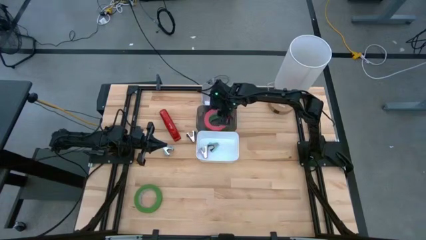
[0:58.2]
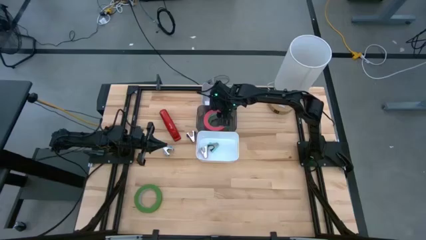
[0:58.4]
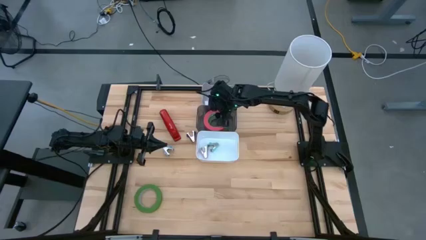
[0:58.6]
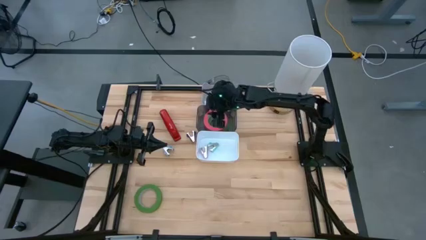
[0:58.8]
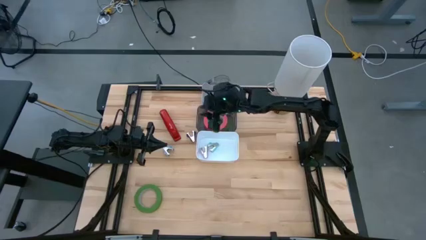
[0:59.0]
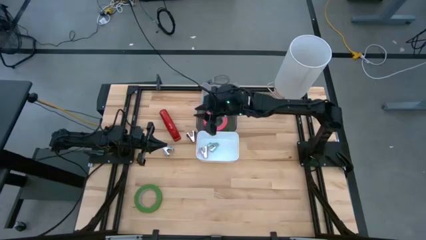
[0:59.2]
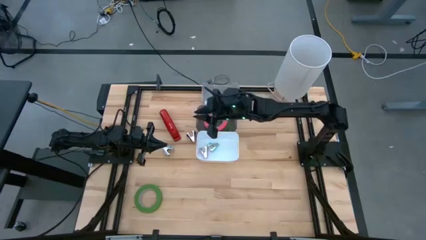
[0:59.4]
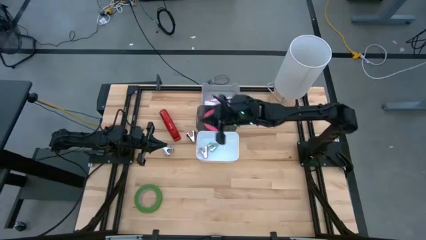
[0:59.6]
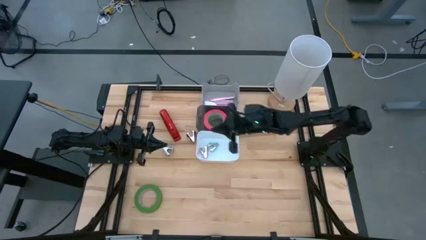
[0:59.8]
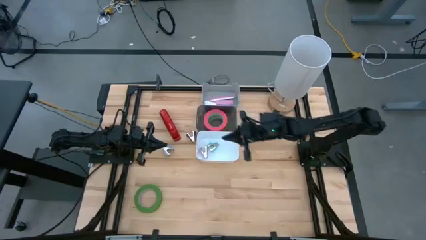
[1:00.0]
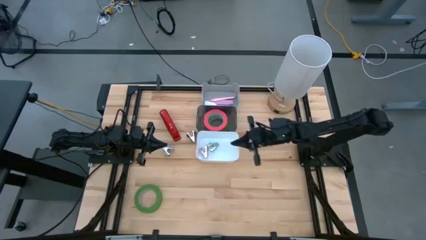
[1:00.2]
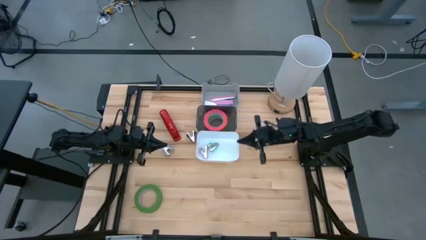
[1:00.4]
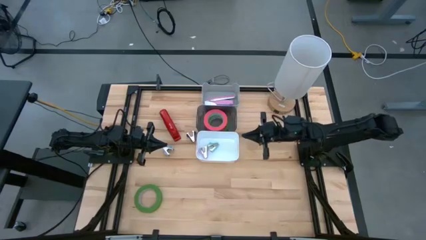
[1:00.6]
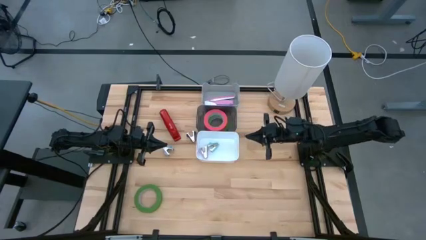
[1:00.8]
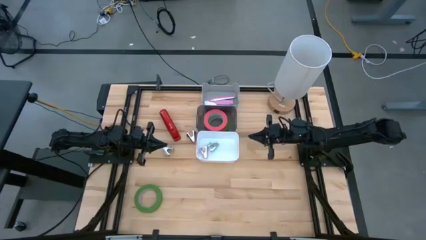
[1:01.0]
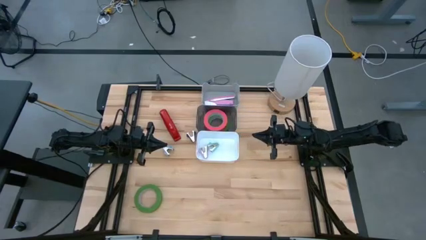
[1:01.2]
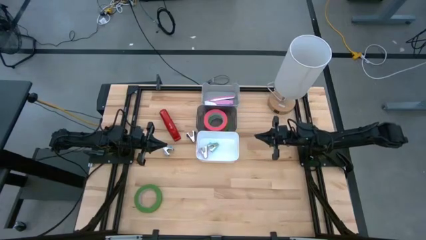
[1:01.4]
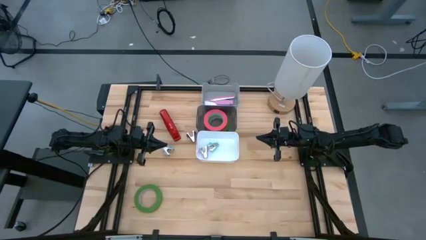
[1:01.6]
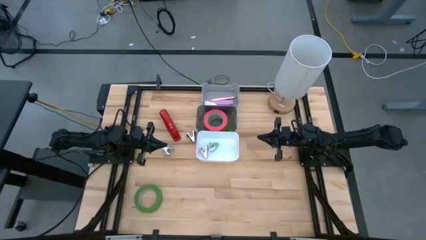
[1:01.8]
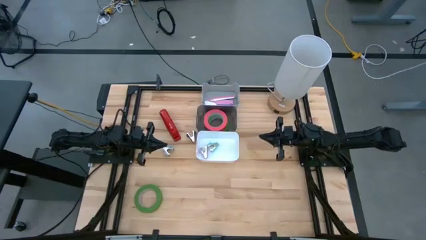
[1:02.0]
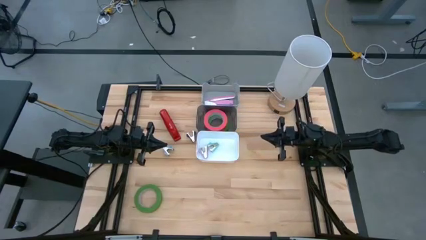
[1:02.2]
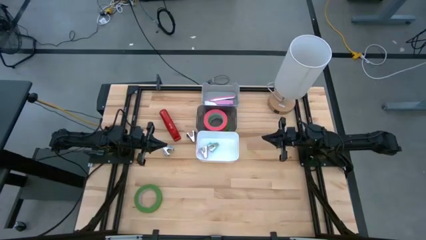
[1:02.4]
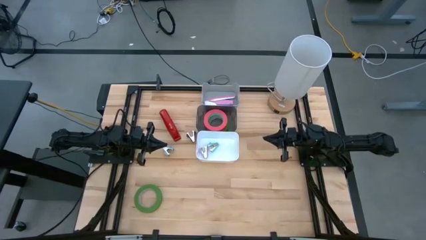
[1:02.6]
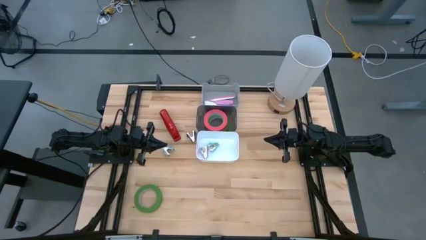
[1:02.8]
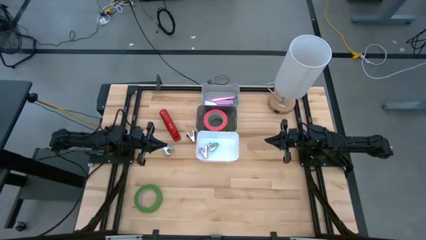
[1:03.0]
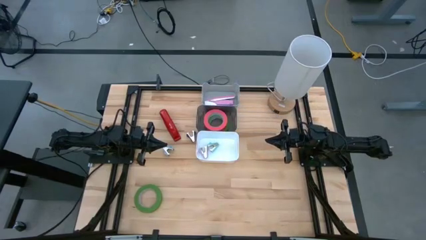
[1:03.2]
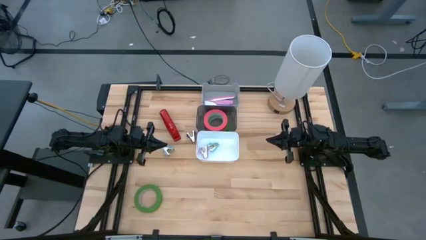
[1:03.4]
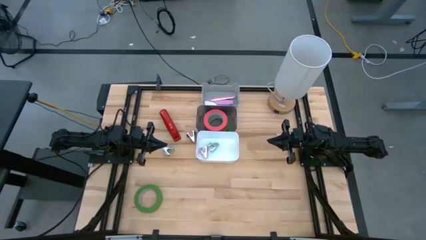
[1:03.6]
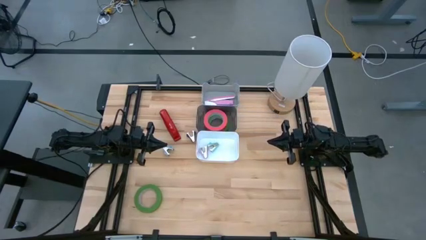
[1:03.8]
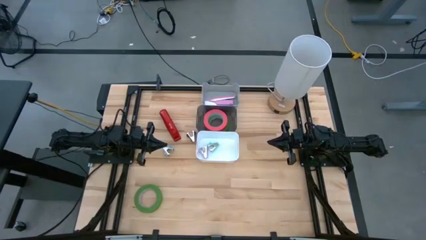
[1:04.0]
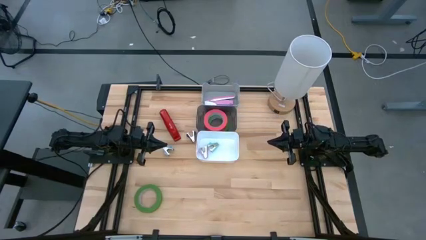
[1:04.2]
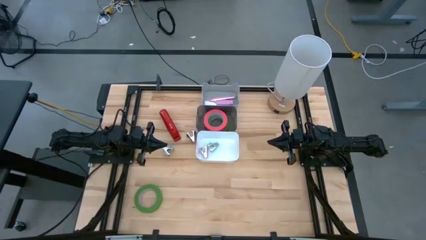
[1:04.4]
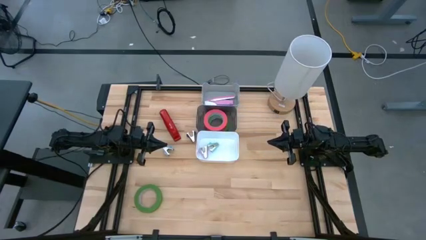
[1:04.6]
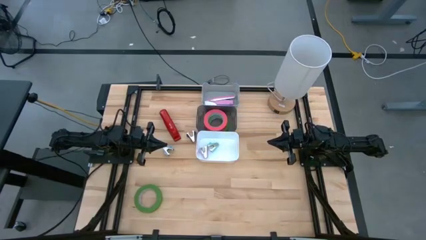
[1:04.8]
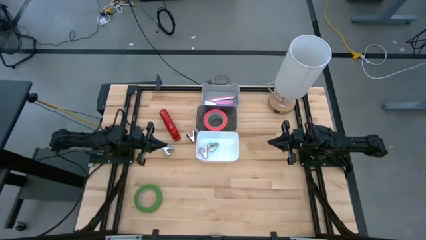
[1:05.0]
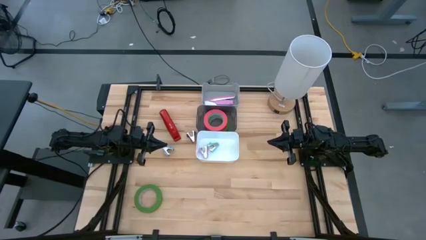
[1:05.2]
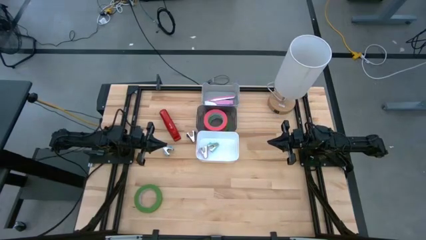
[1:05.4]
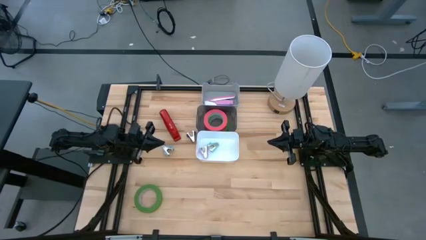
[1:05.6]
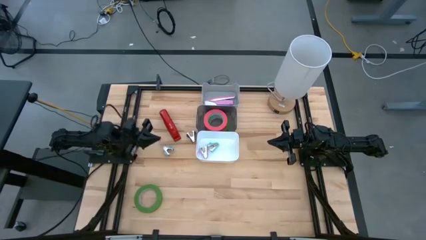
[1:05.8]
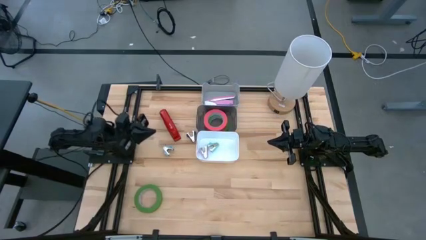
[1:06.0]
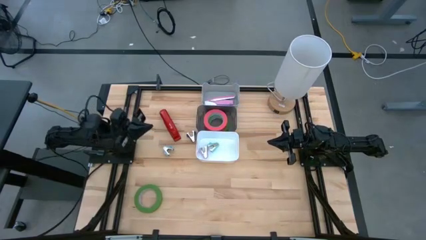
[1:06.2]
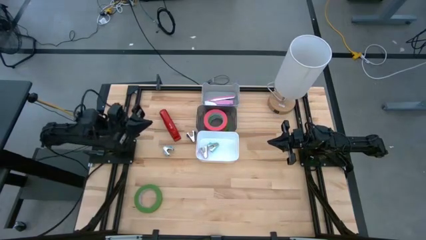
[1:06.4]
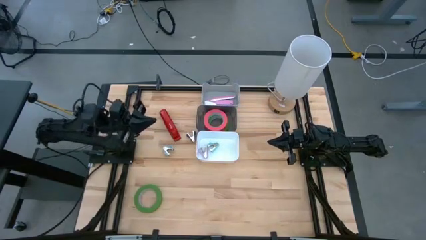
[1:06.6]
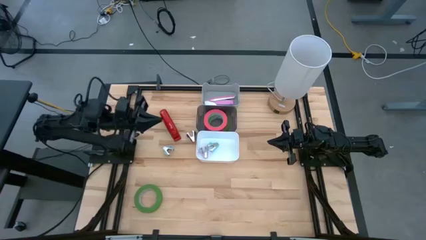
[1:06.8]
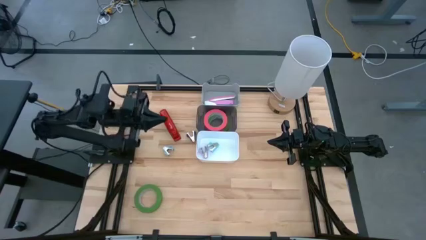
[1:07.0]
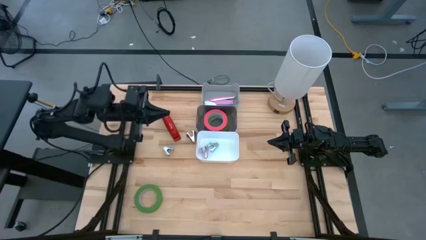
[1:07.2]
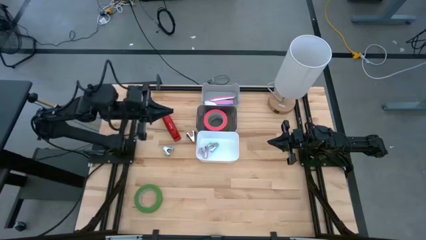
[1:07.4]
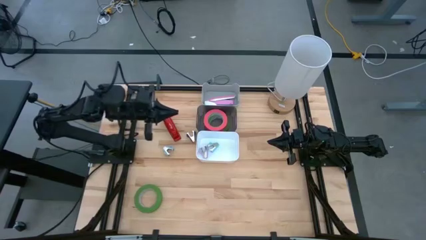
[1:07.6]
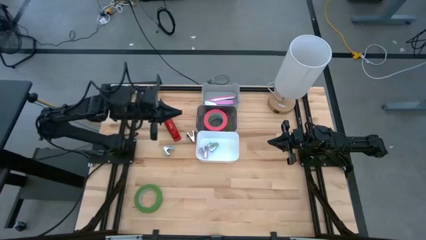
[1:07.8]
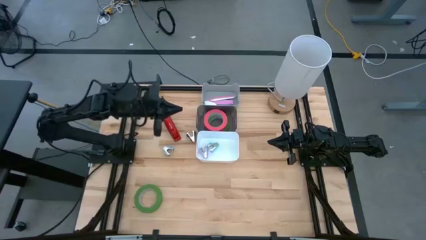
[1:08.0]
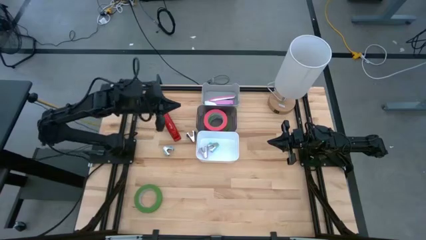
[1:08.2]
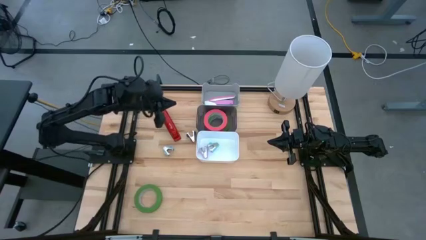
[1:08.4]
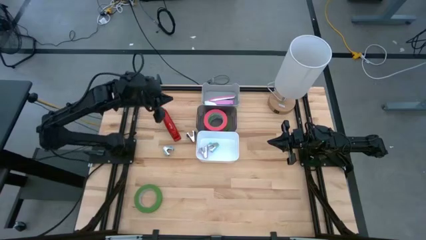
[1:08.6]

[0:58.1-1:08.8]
Task: Pick and place Stapler, Stapler remover, tape
Put the red stapler in the gray bin
